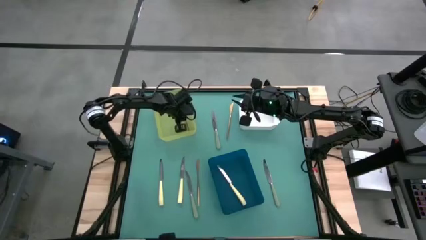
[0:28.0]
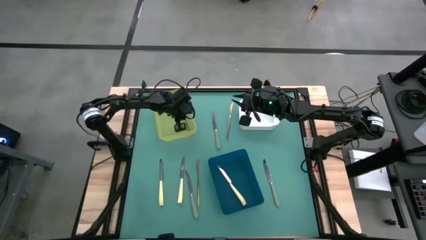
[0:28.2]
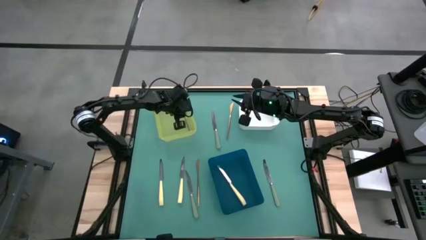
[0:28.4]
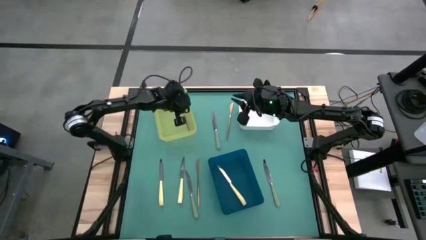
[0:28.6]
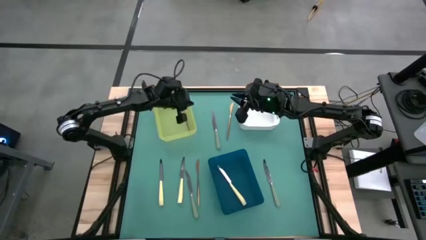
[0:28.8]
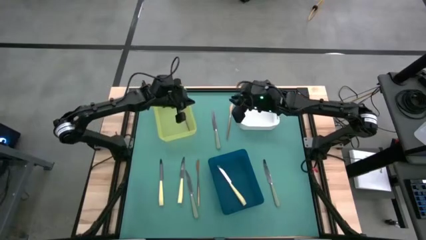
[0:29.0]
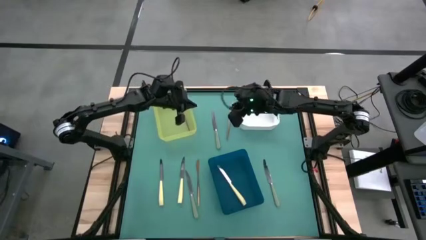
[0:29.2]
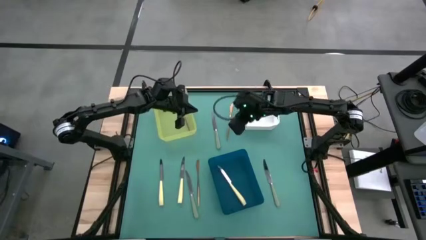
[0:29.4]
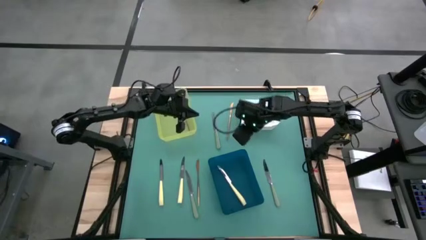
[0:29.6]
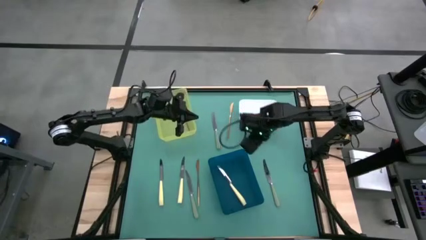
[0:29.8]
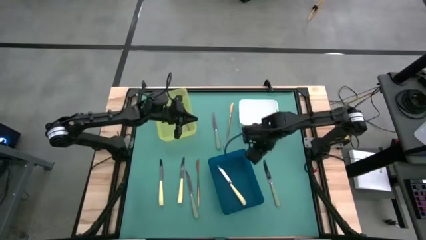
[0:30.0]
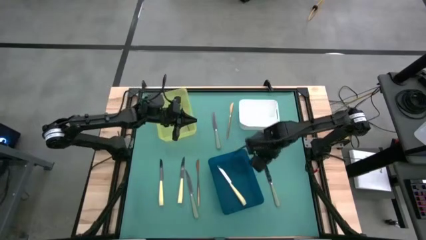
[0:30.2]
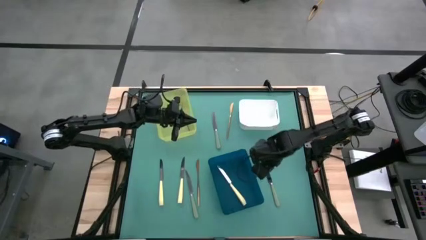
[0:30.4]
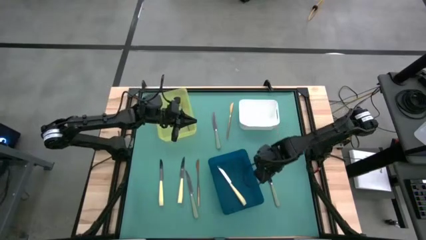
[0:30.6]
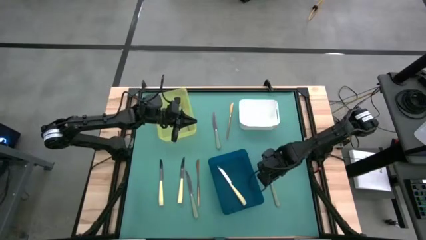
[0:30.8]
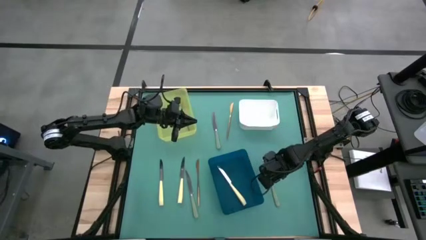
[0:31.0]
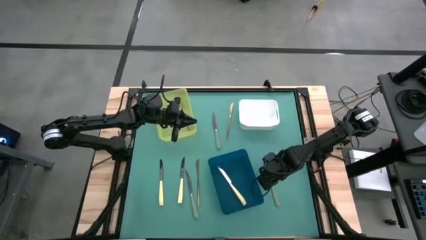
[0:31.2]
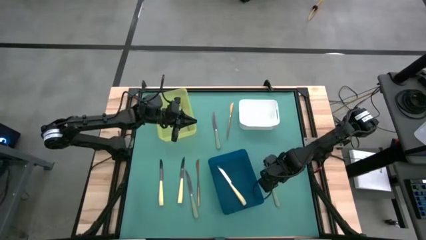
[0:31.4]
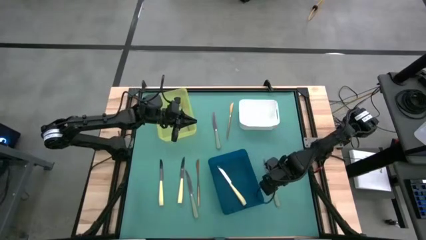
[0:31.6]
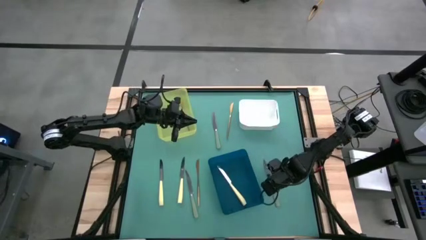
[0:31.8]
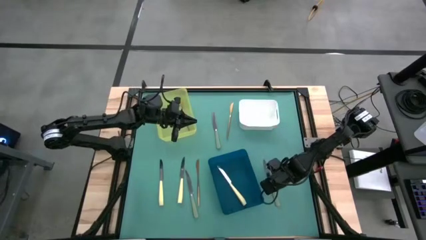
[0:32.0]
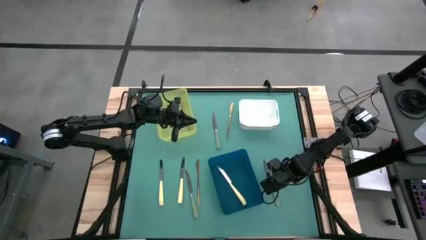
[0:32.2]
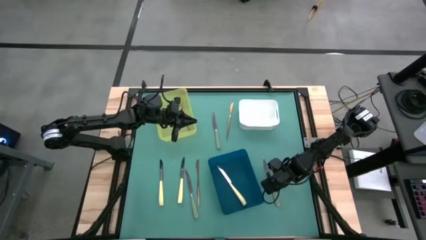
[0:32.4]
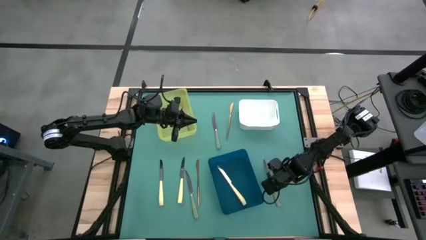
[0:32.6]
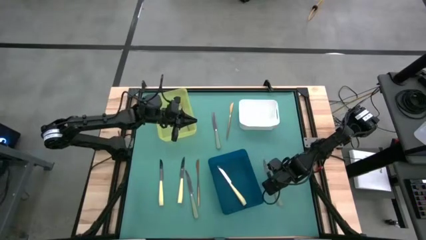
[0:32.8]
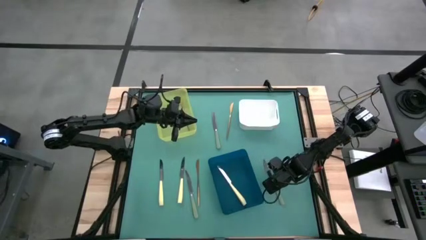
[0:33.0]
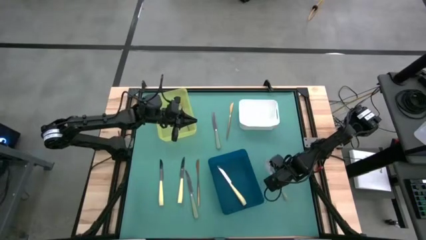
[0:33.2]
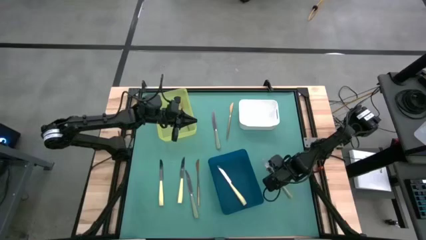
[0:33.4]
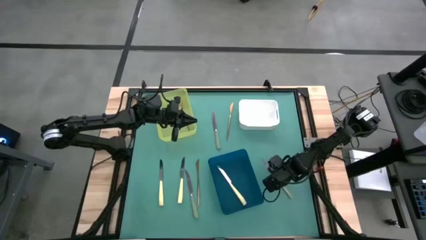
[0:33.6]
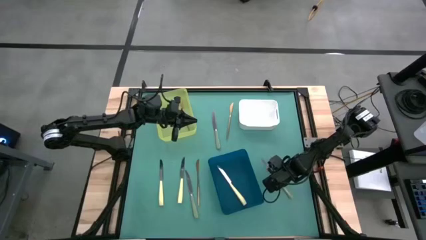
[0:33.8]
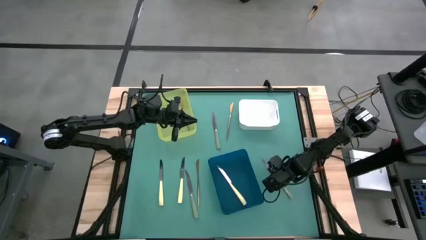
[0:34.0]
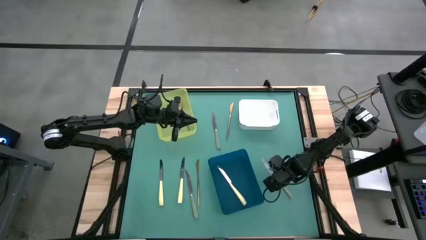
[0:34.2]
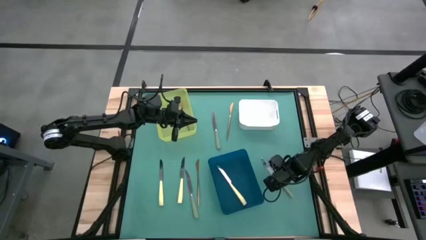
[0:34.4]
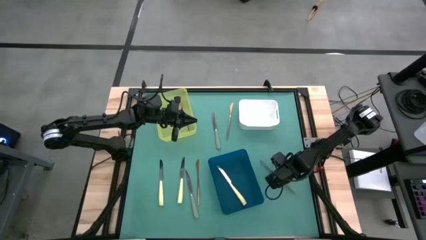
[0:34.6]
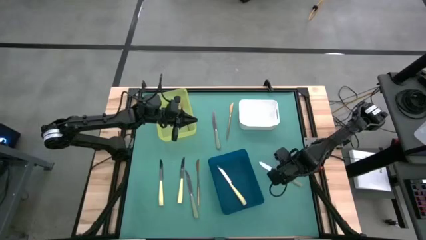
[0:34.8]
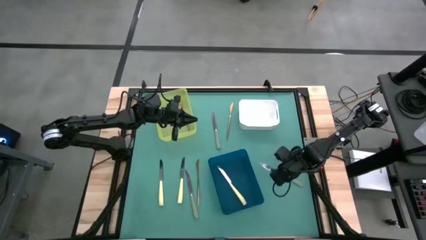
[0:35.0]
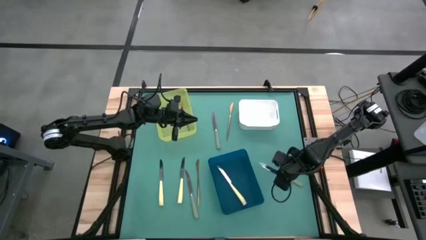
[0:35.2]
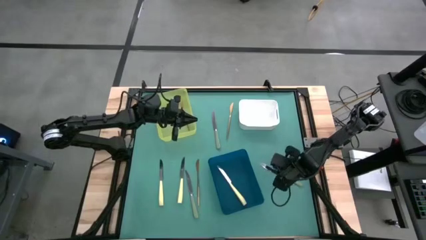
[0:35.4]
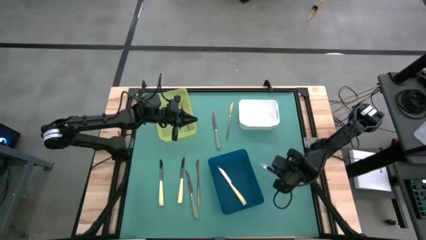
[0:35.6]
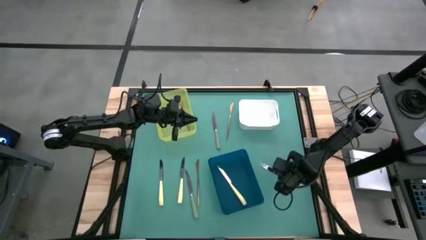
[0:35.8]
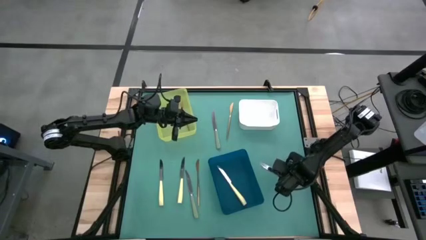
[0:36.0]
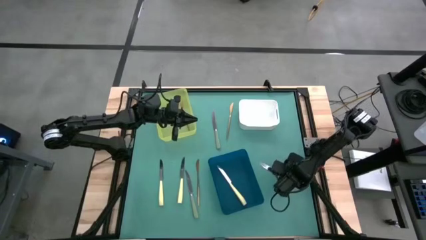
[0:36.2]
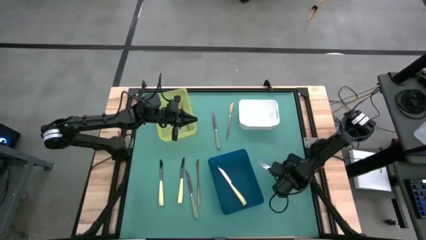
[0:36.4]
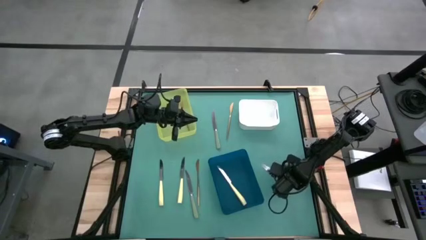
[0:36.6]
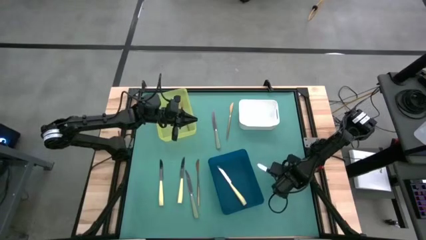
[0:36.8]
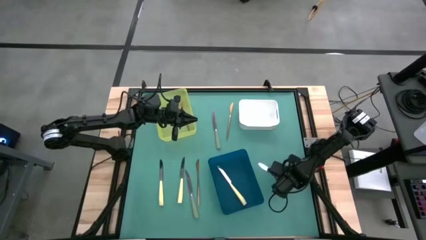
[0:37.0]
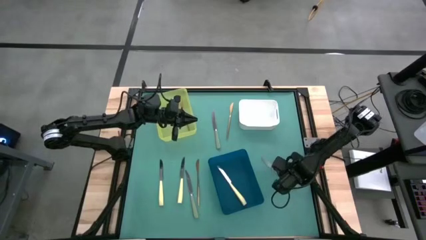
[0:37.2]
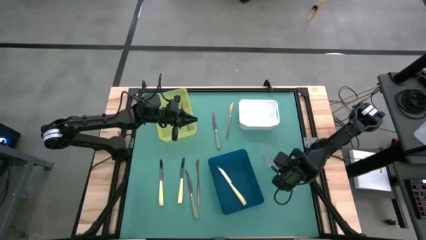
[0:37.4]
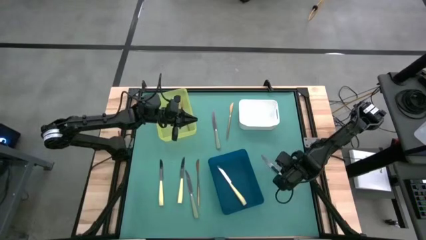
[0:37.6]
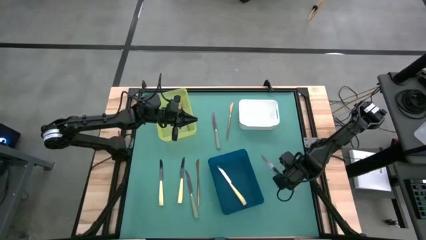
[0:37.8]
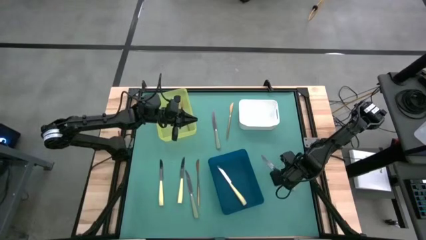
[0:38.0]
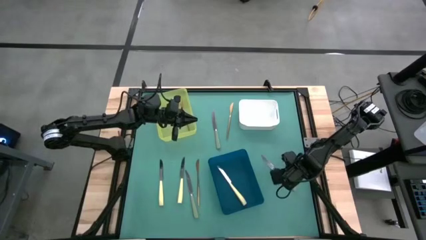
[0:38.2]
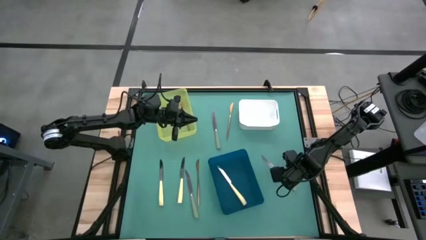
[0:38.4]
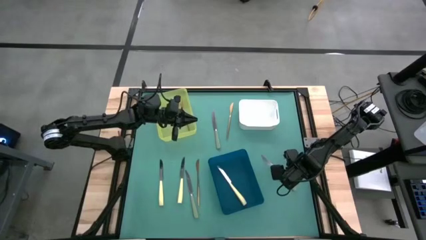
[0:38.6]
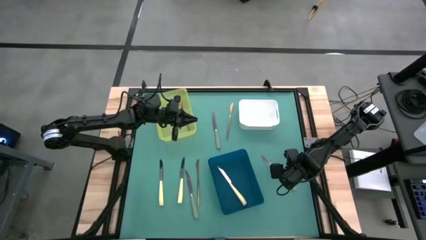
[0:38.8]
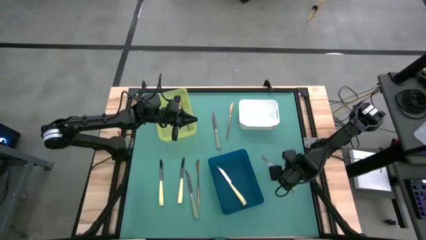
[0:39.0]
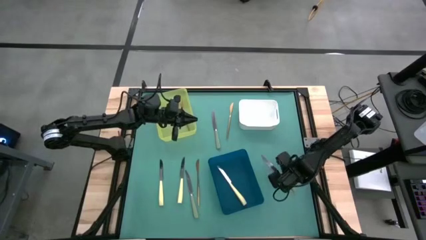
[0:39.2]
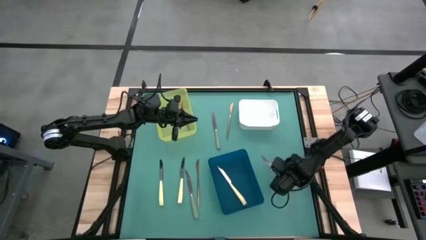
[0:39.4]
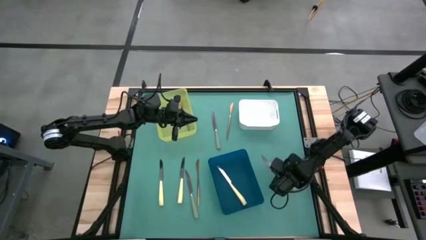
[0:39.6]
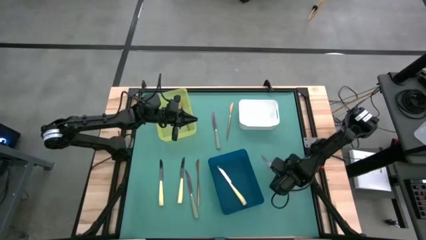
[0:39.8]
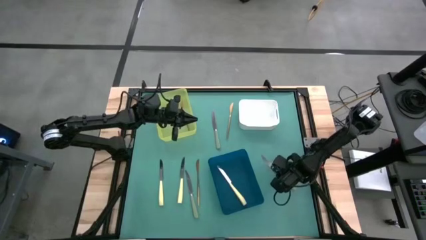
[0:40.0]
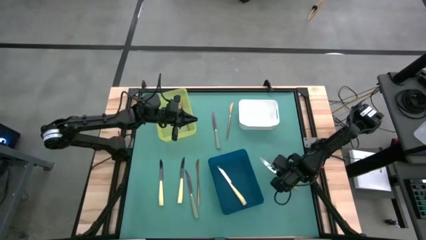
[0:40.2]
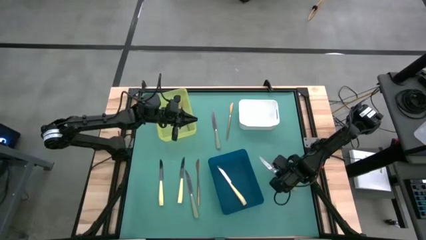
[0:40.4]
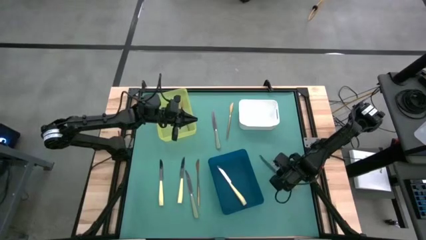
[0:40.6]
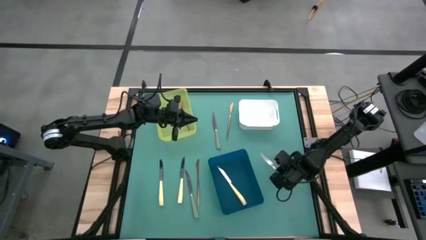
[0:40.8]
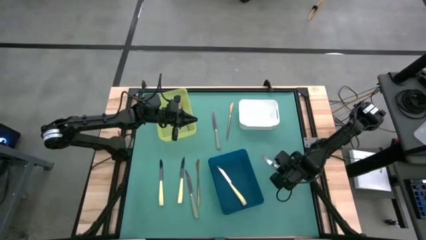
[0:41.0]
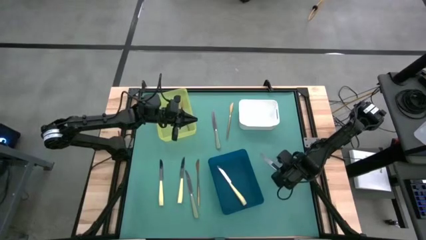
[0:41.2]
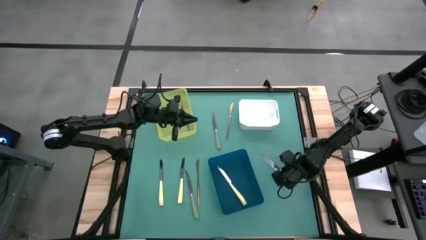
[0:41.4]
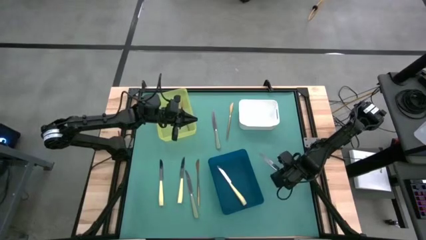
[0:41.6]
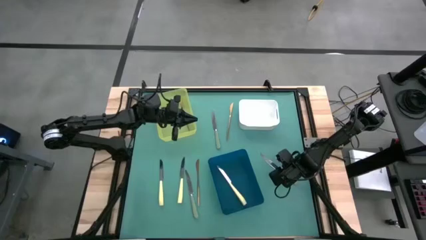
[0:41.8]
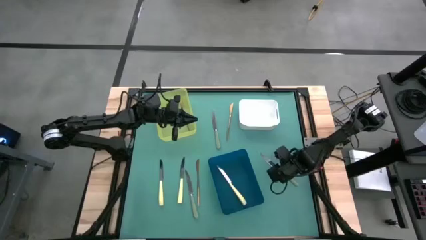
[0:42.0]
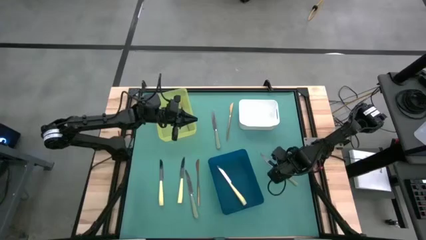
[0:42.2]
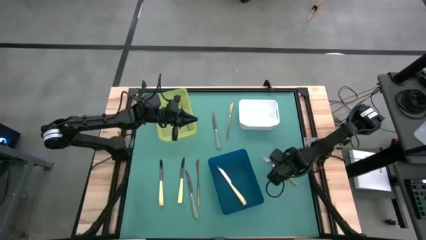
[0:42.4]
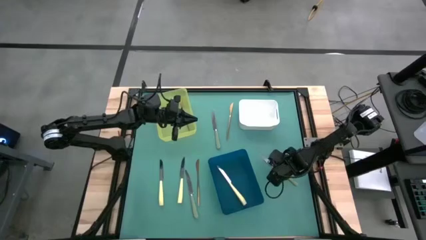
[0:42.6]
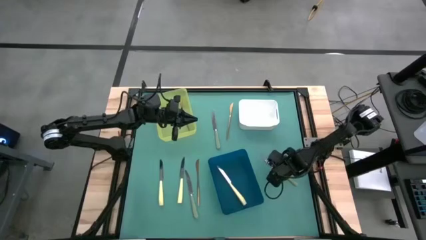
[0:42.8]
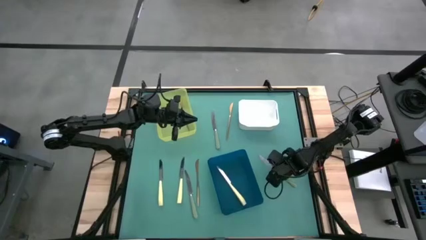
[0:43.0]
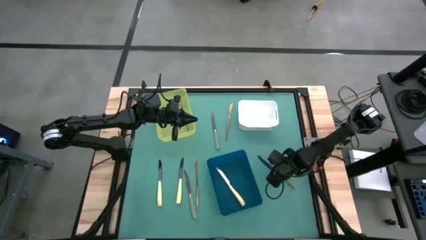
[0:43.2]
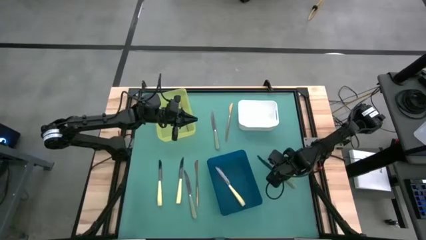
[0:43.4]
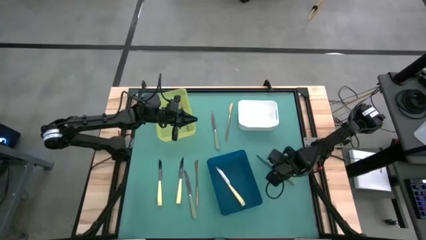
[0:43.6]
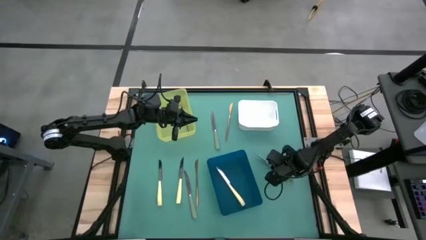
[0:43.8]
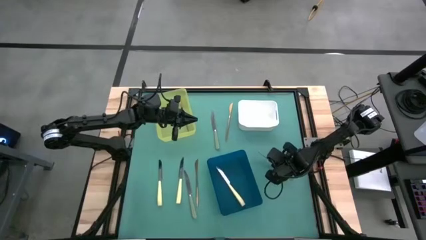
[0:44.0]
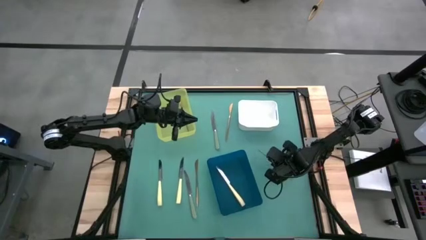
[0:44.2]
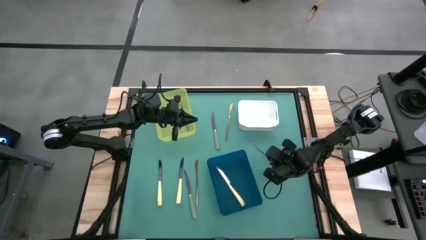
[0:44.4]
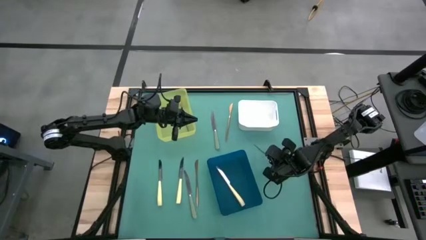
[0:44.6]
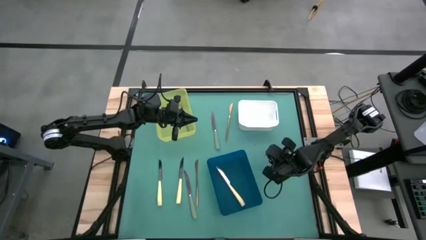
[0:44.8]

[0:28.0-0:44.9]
Task: Sort silverware by color (type)
Put the bottom right green knife into the white bin
